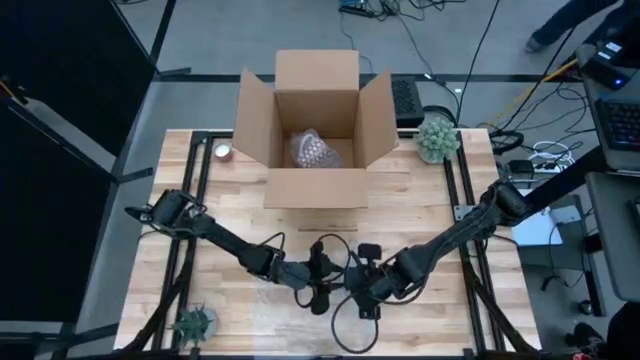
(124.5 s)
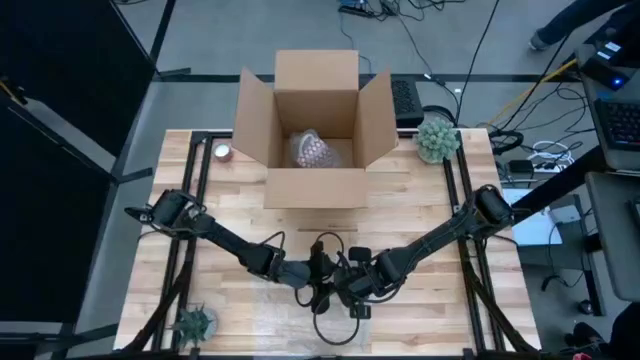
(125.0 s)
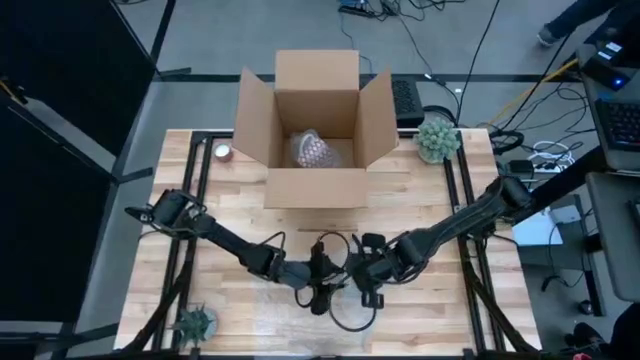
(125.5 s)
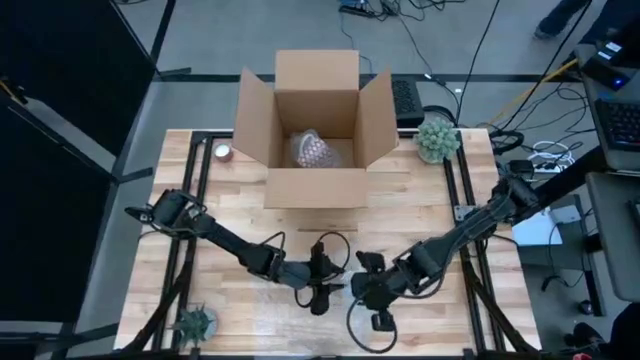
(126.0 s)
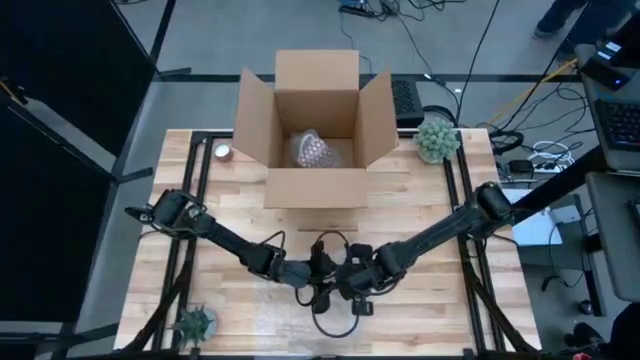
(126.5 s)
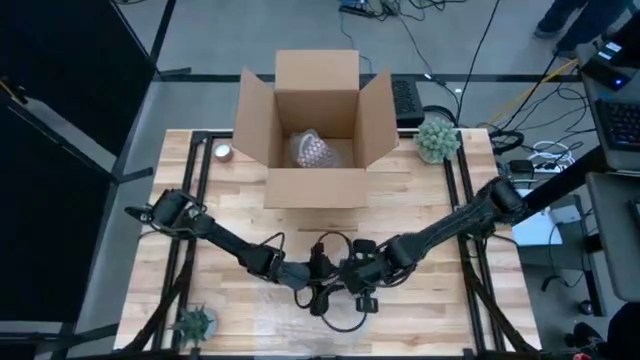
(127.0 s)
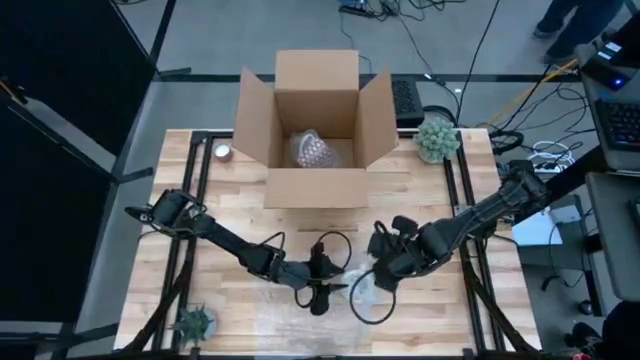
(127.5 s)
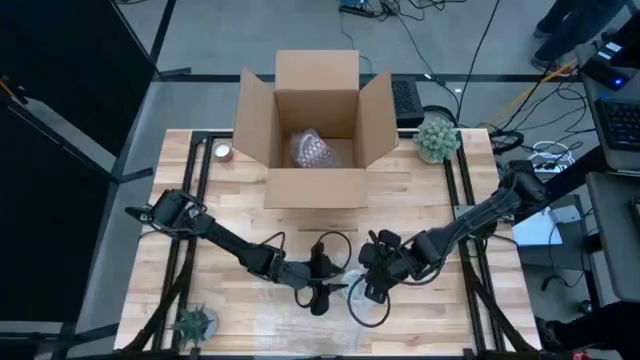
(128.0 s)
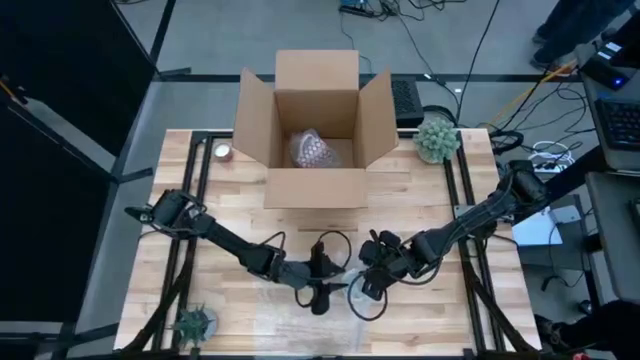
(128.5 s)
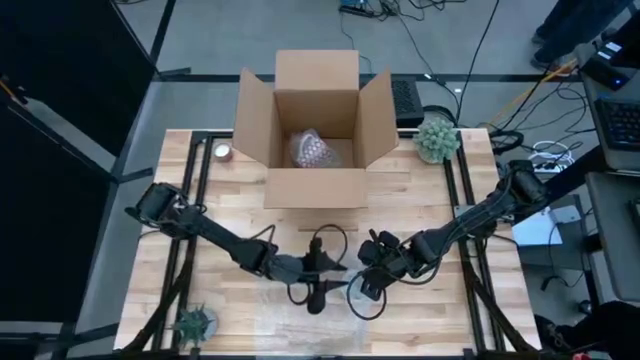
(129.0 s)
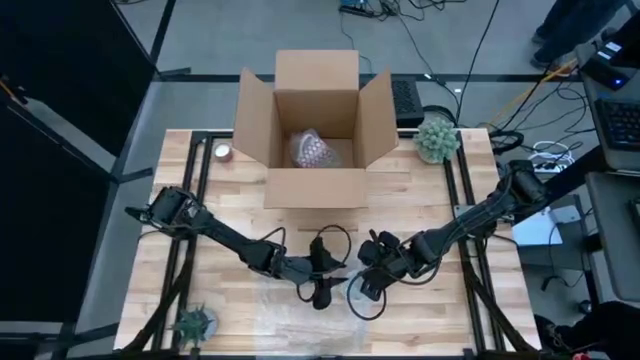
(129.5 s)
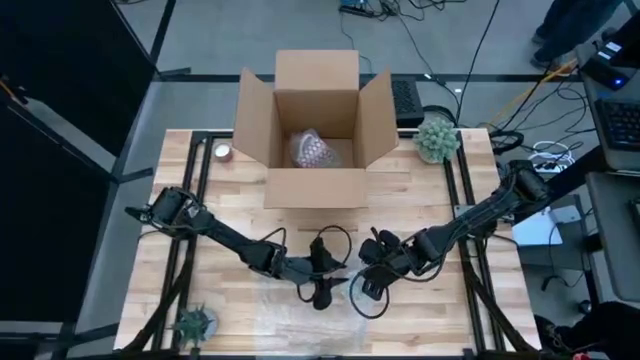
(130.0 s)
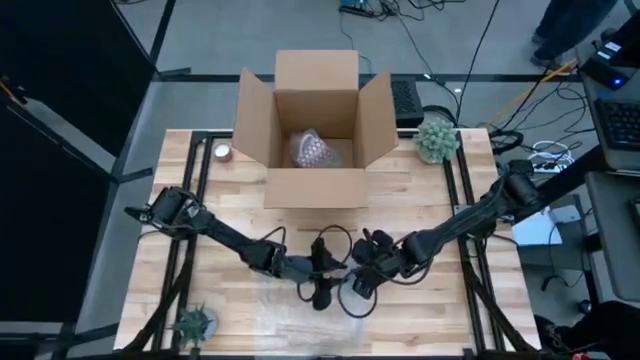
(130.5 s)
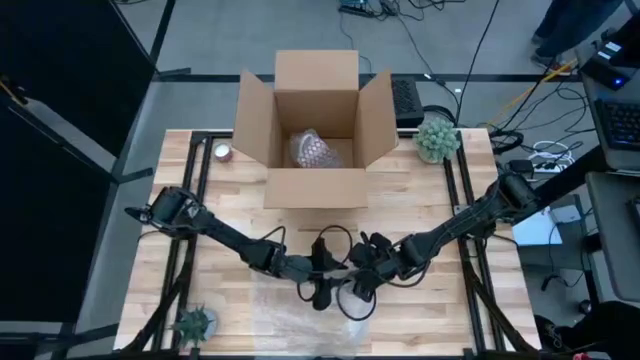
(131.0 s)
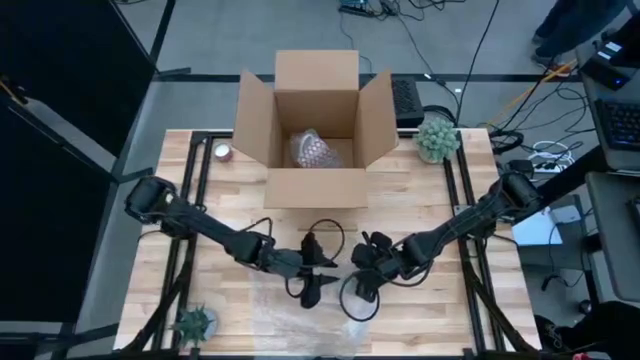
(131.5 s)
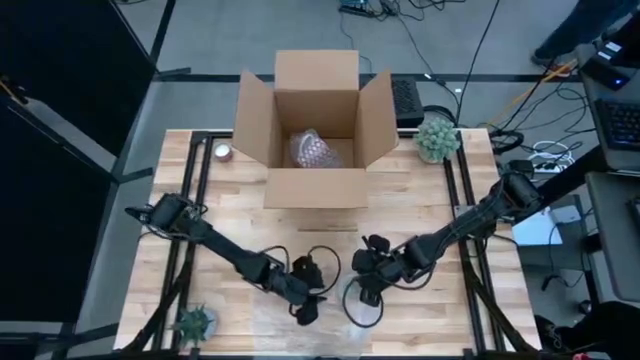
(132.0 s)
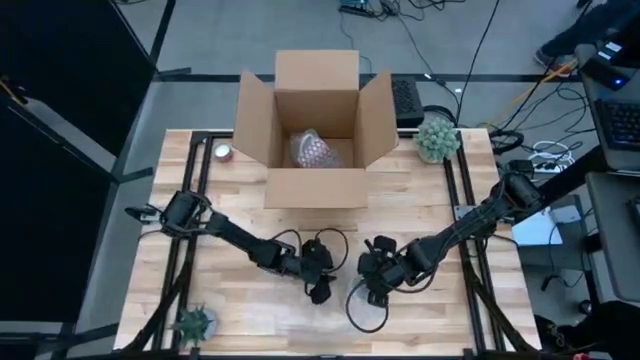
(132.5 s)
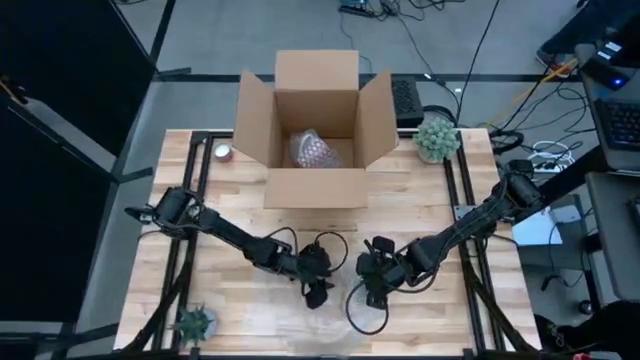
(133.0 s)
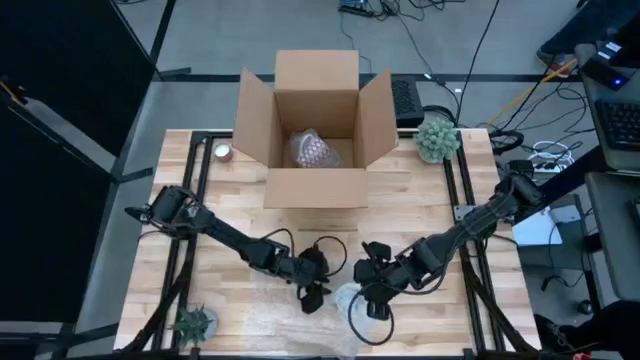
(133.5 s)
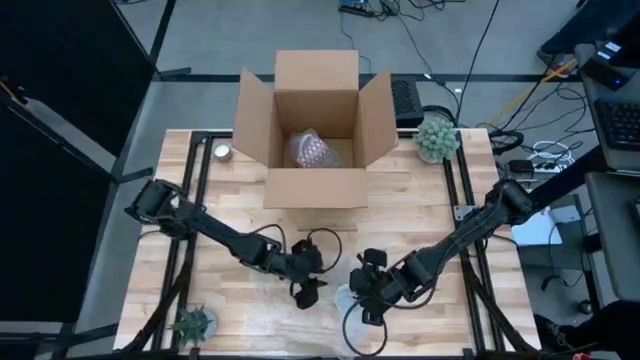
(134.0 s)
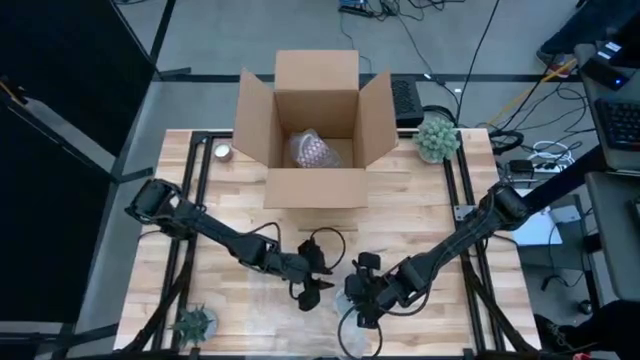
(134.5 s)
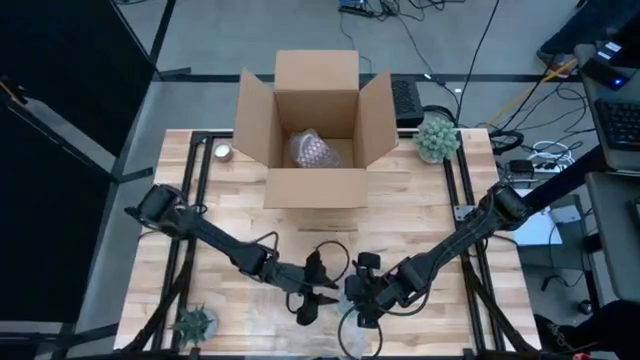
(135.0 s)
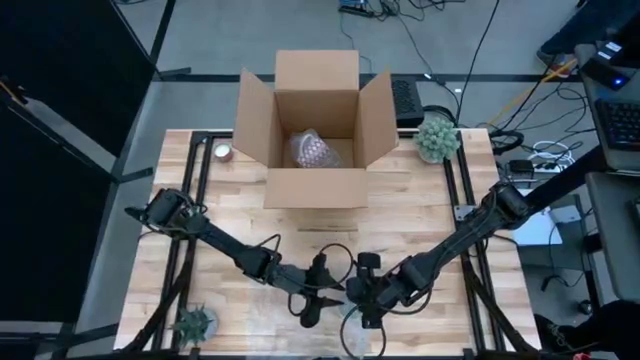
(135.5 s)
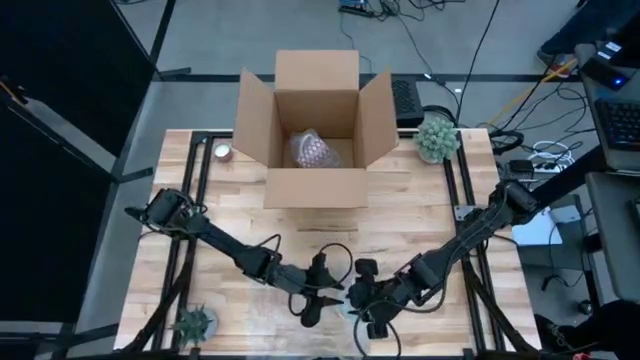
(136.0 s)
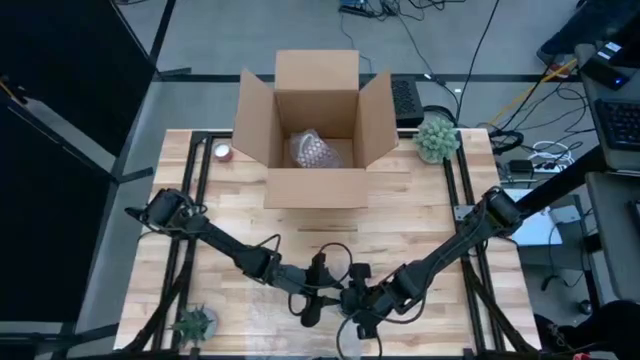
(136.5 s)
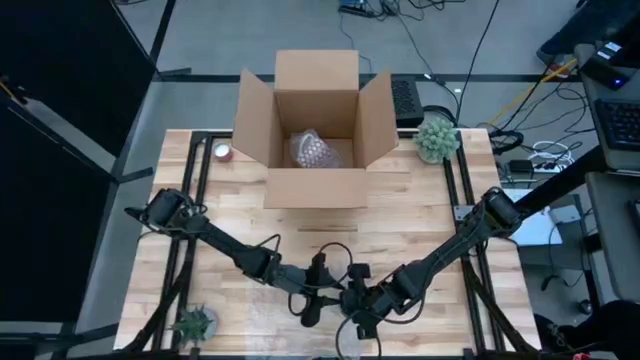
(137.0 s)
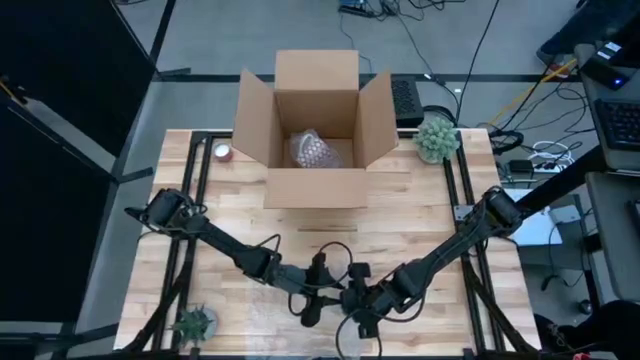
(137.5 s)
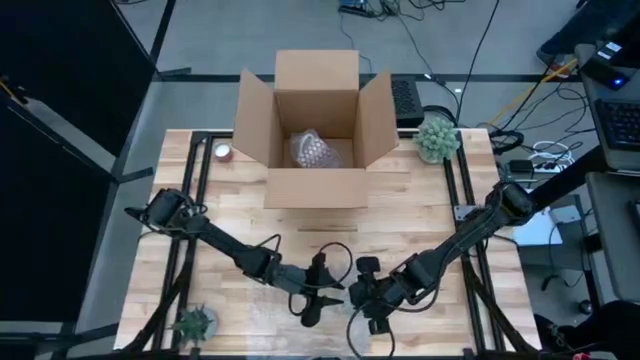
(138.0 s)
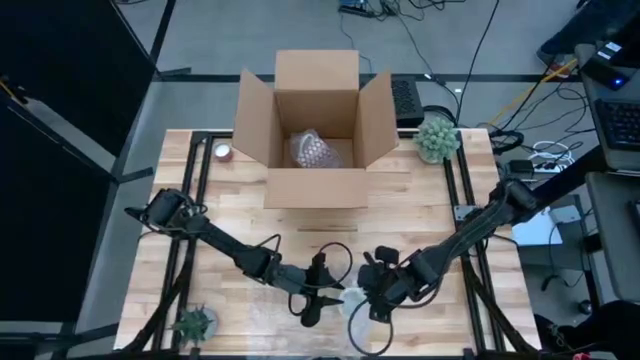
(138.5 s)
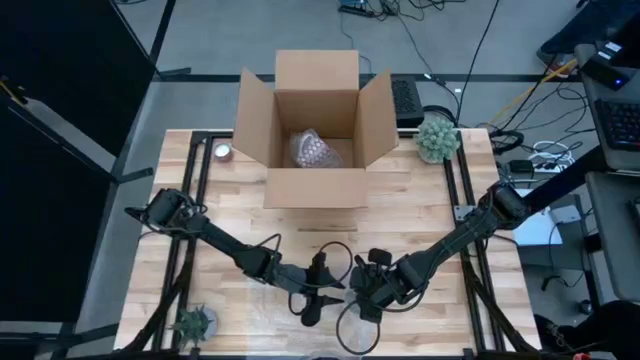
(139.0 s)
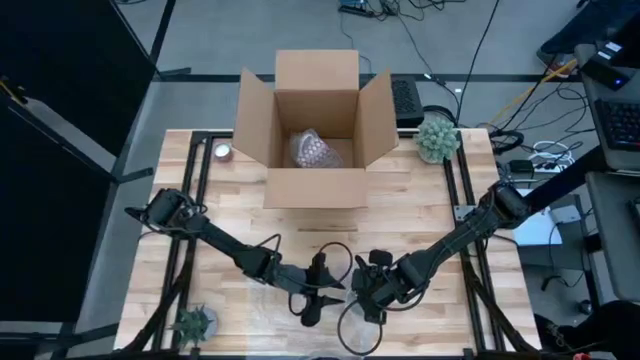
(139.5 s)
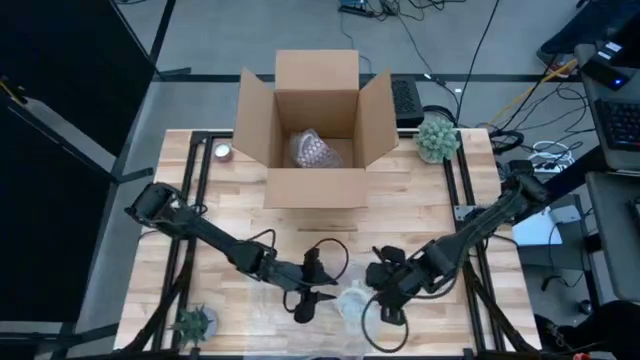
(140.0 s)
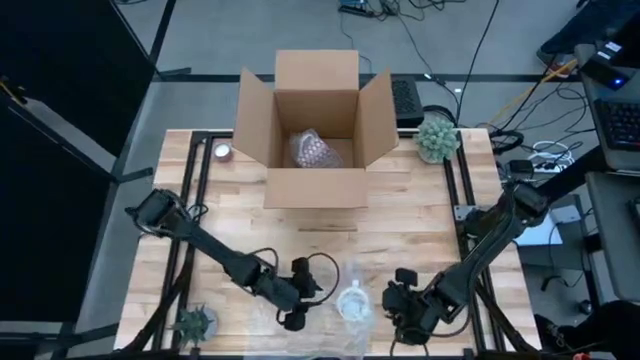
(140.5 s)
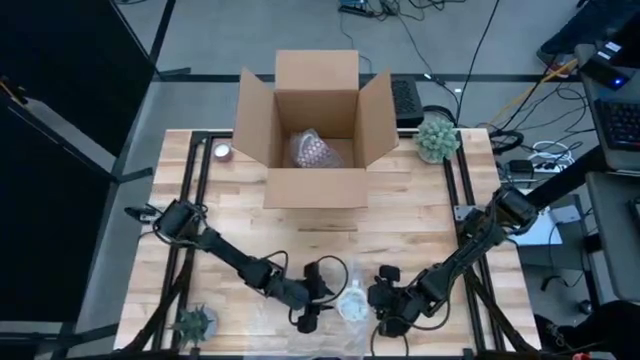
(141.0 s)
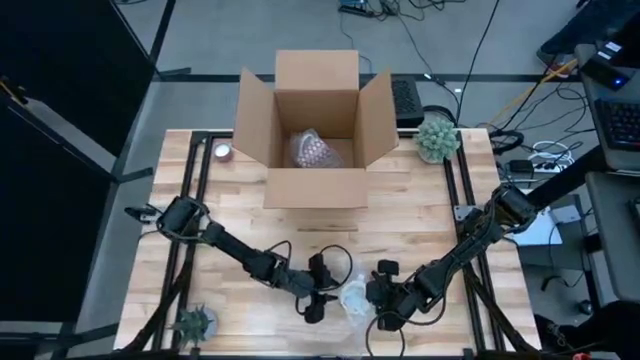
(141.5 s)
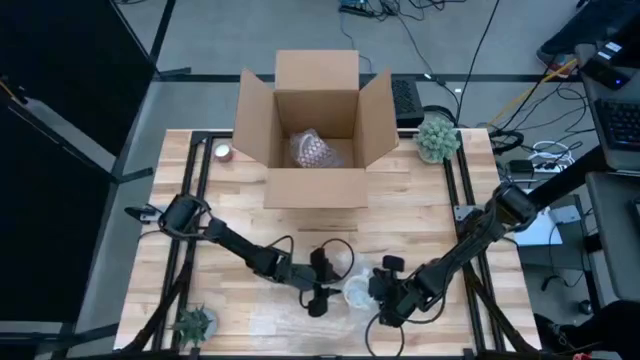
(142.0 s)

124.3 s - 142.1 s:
Task: wrap mug
Wrap the yellow mug with the bubble wrap

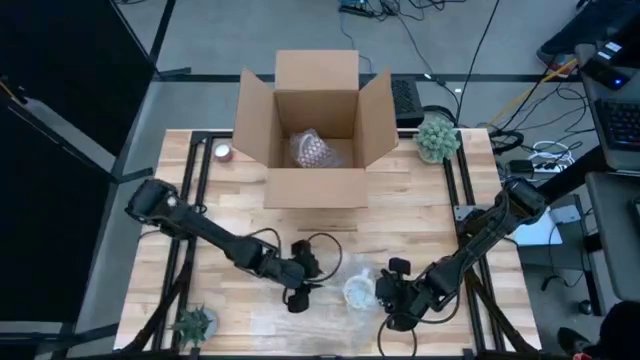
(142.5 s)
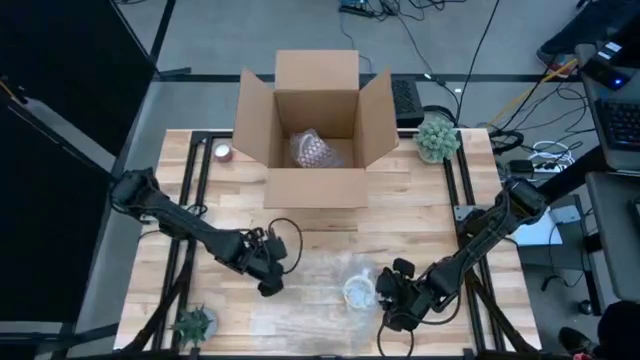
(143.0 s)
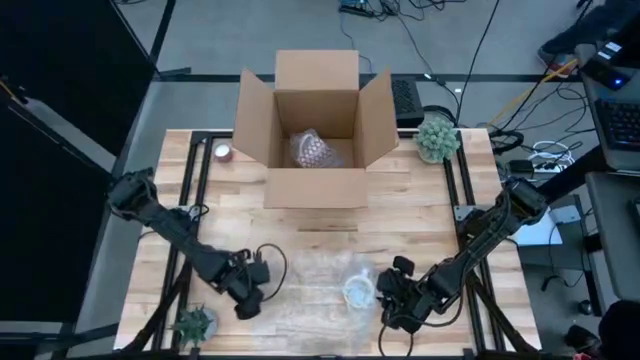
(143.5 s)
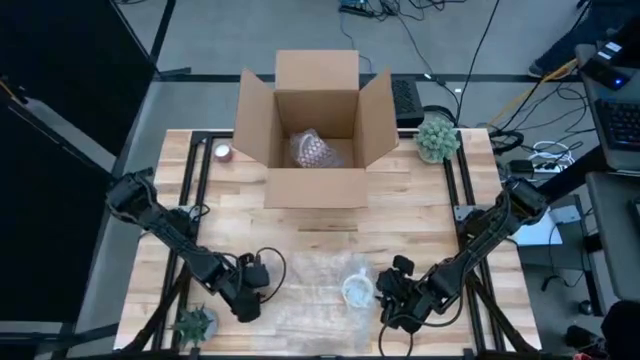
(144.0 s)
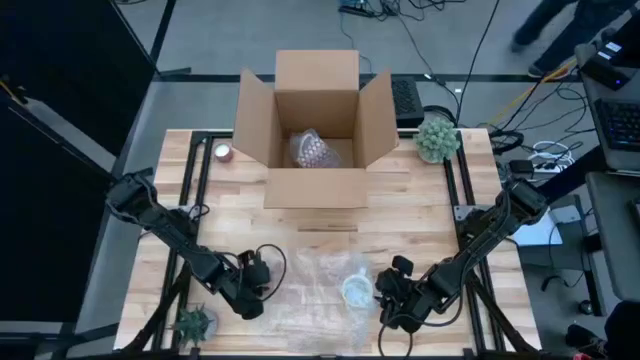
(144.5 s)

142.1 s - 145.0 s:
Wrap the yellow mug with the bubble wrap
